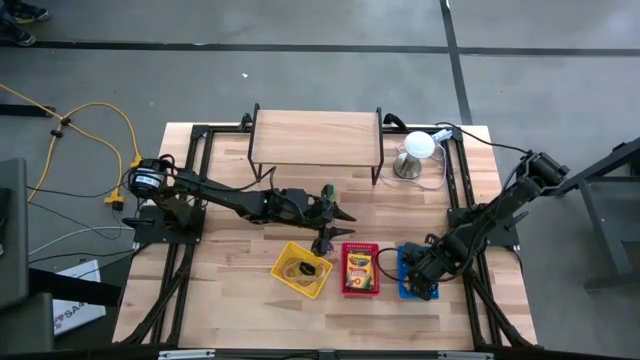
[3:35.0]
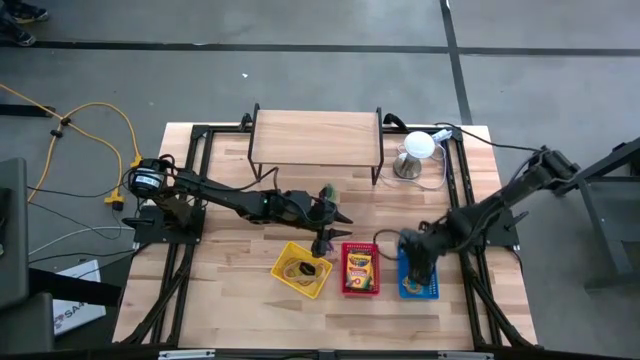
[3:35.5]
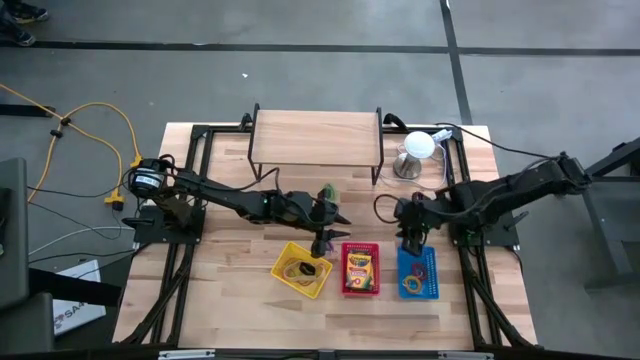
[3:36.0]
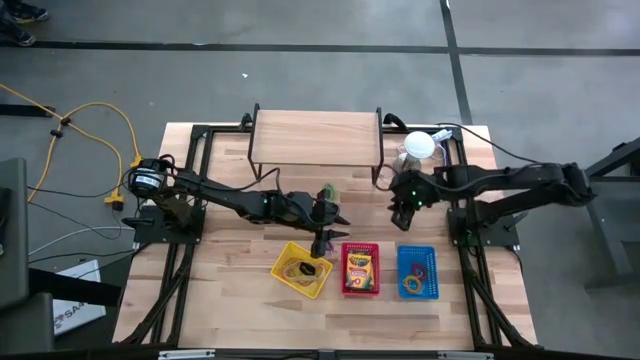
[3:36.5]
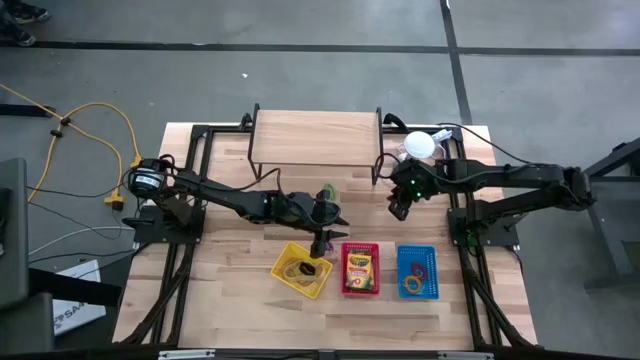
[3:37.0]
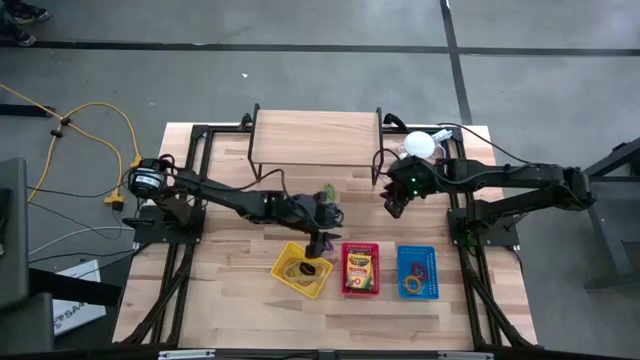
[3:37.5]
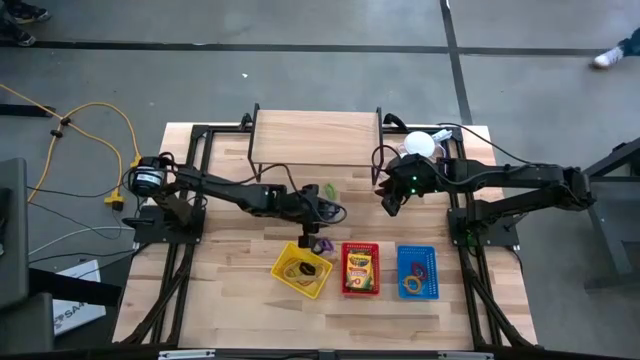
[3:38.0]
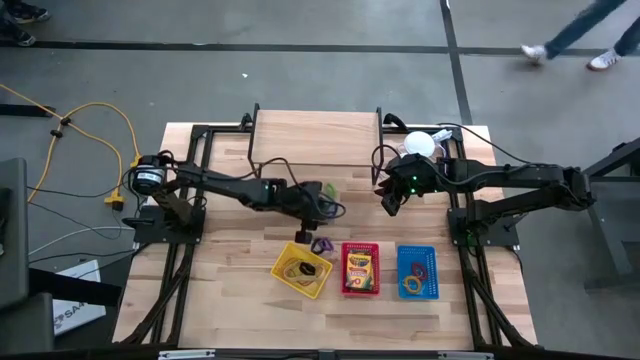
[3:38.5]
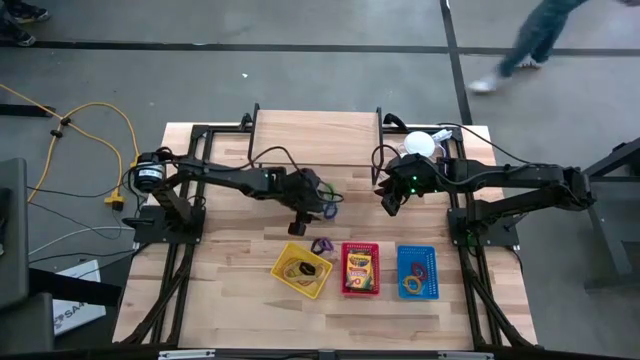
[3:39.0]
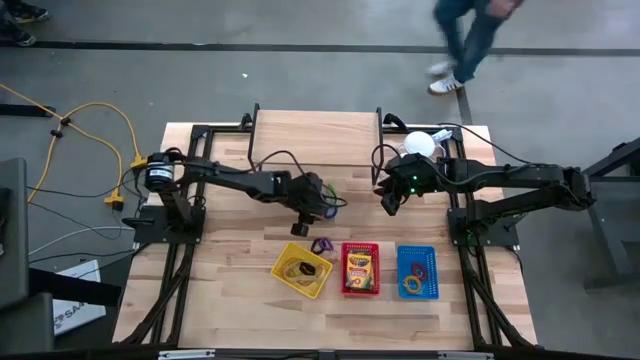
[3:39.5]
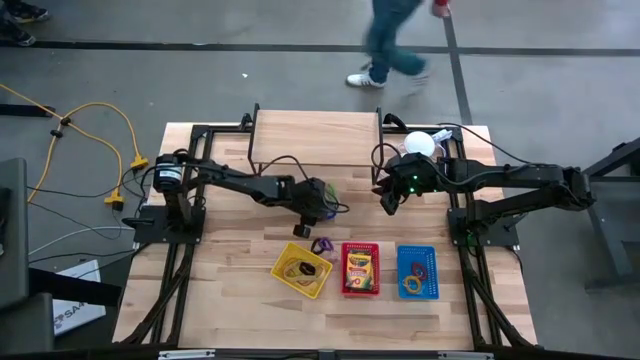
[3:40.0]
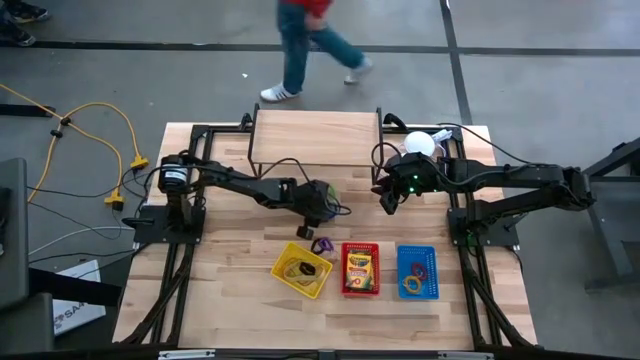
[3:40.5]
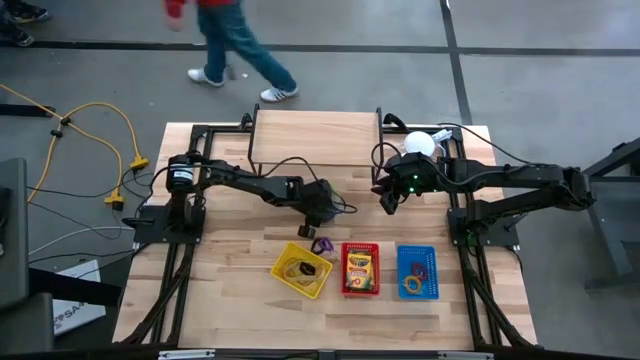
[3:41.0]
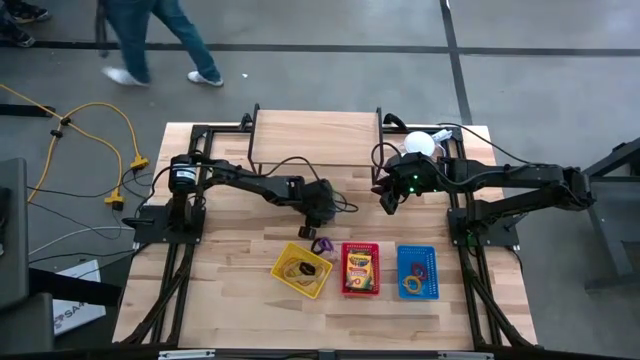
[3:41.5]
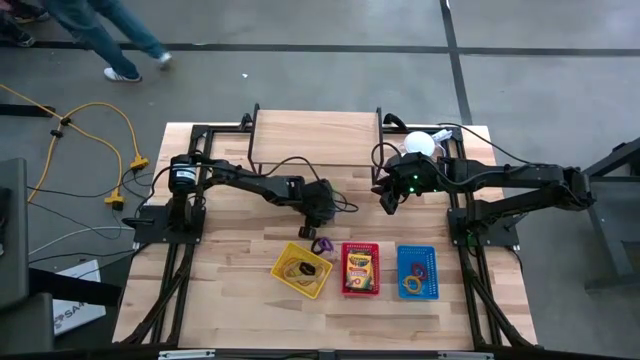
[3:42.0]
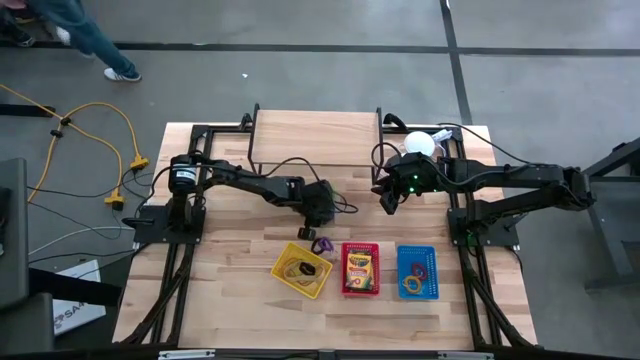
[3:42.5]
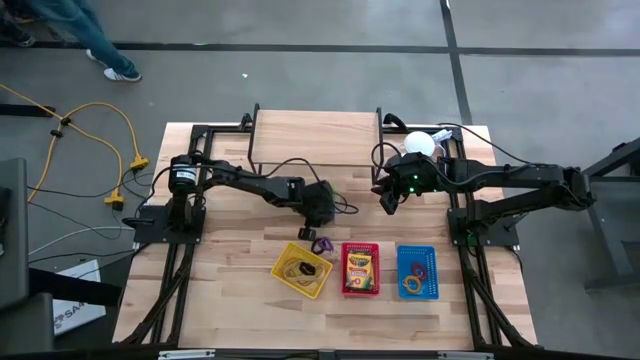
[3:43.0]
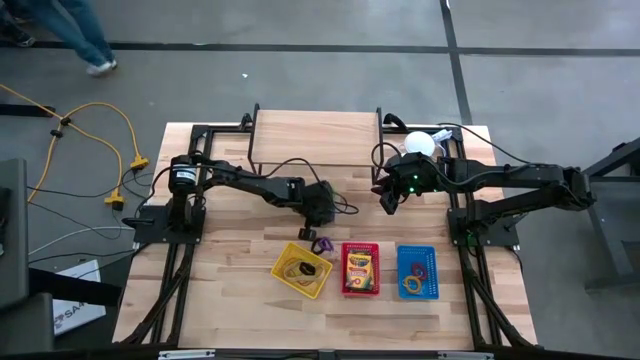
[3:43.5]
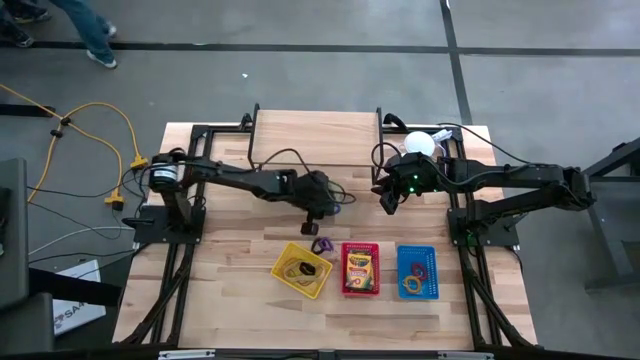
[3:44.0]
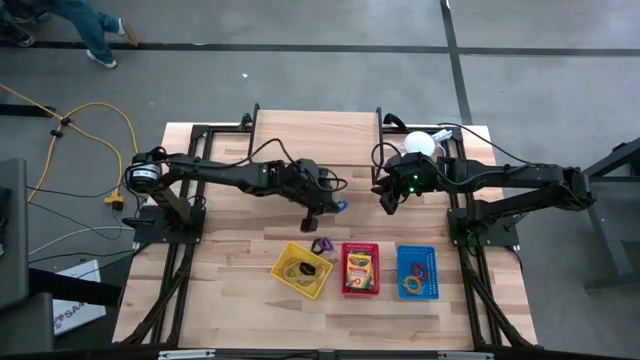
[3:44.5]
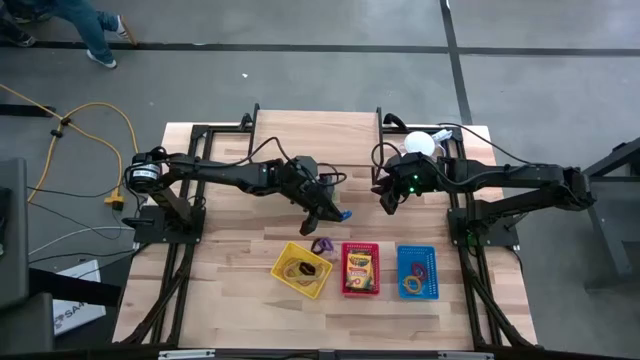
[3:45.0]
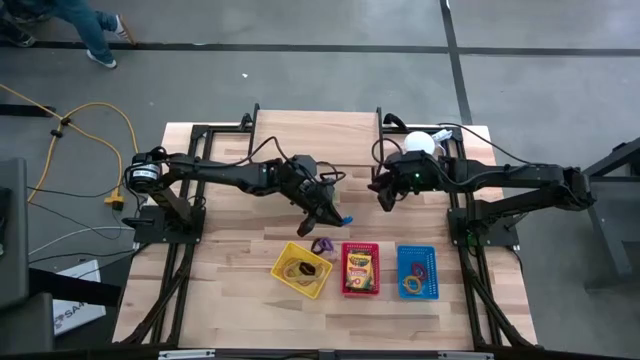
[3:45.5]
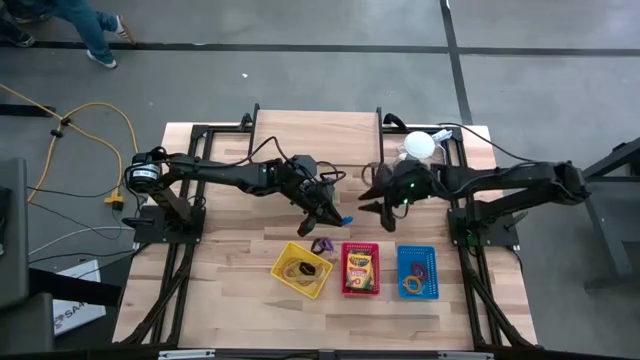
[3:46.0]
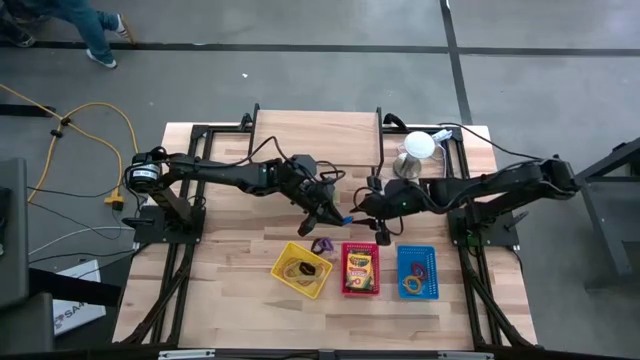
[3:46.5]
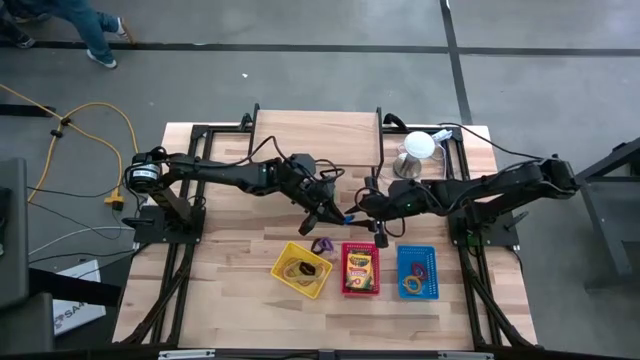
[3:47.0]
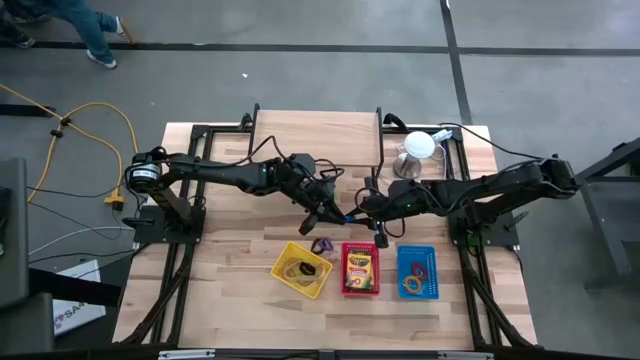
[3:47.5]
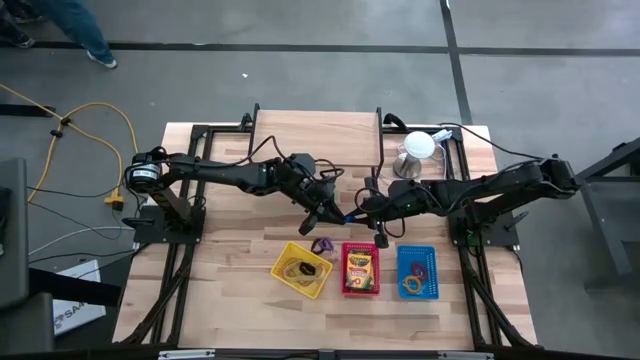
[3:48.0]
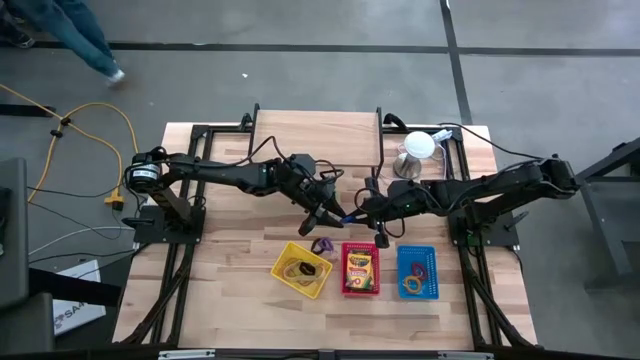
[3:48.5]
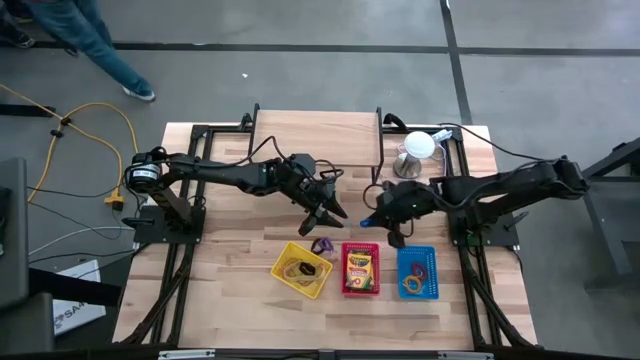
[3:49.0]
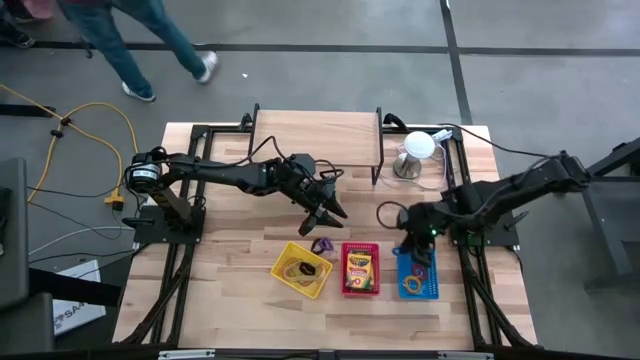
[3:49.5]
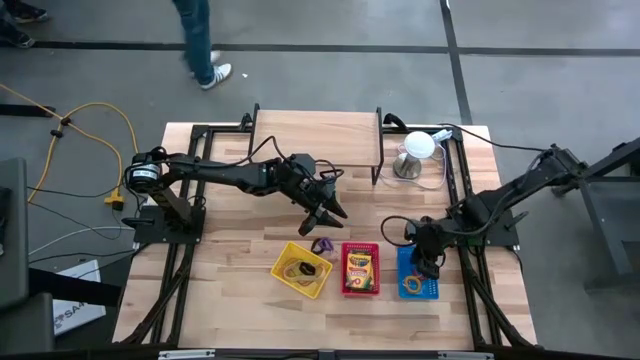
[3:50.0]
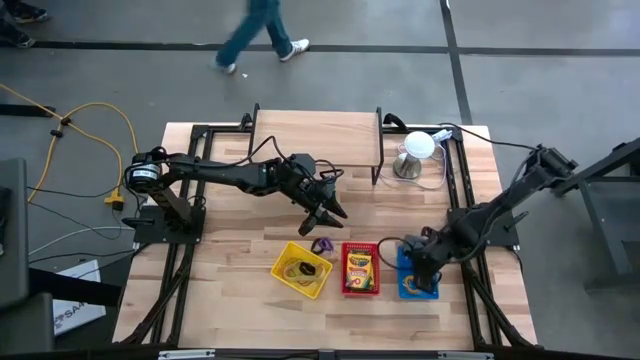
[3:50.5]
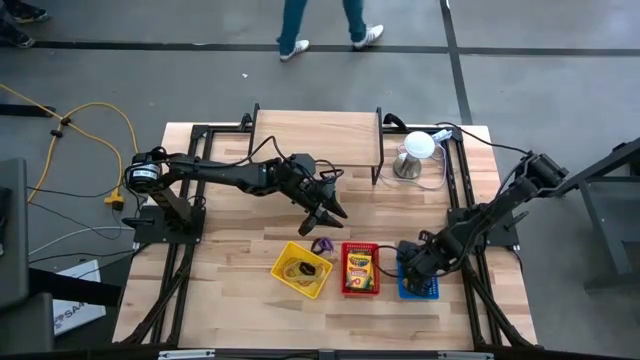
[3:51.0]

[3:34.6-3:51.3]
Task: Pick & Place Office Desk Supplies
Put the blue spring keychain into the blue bin

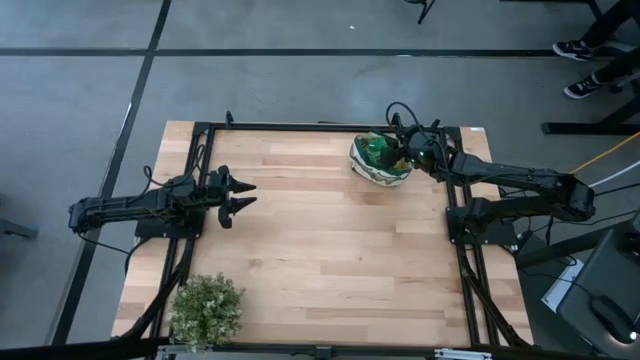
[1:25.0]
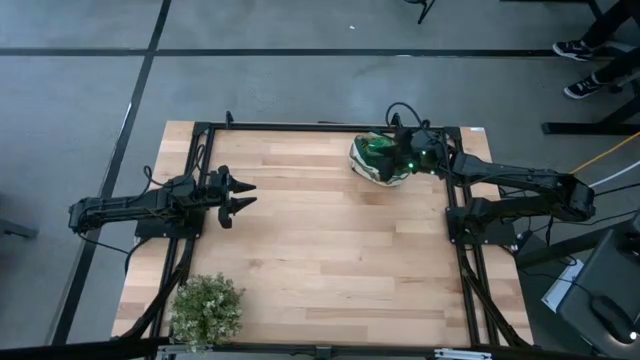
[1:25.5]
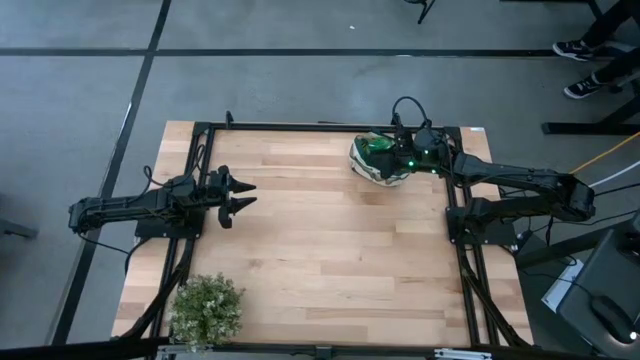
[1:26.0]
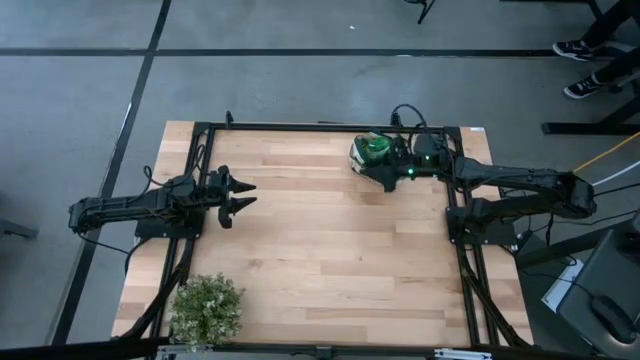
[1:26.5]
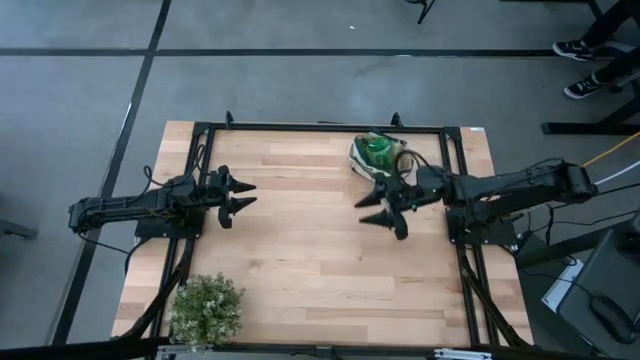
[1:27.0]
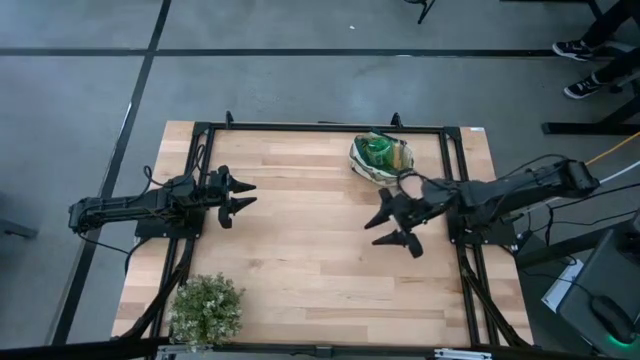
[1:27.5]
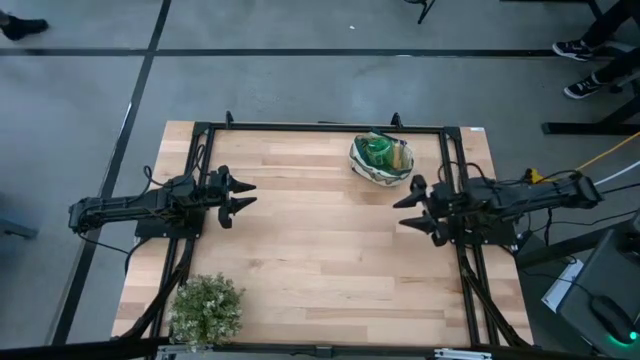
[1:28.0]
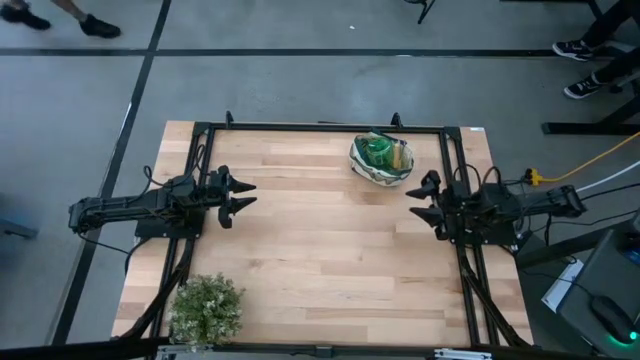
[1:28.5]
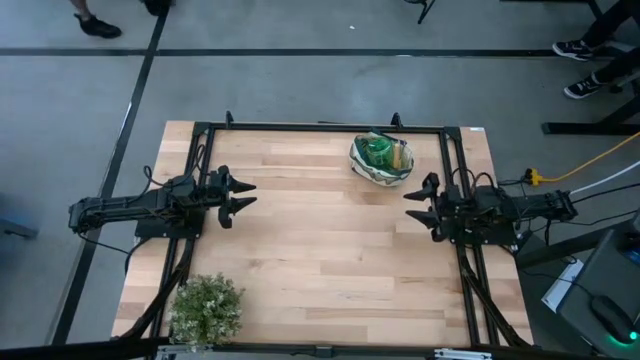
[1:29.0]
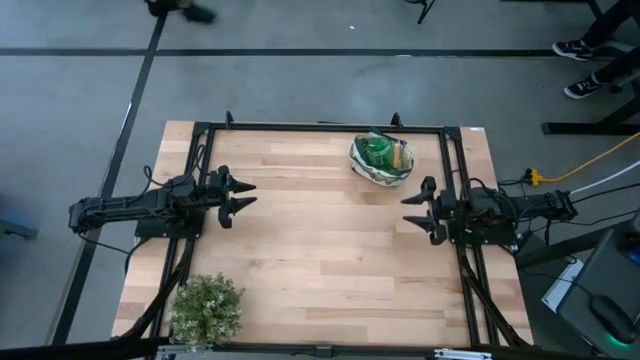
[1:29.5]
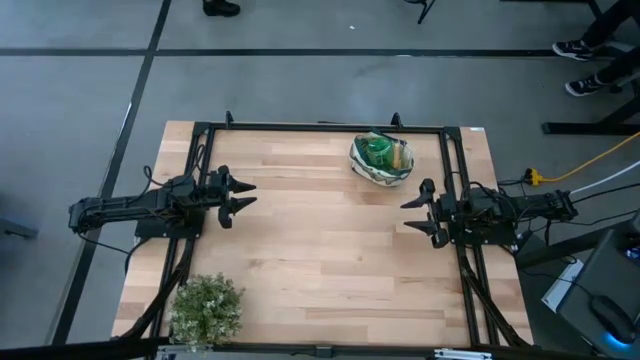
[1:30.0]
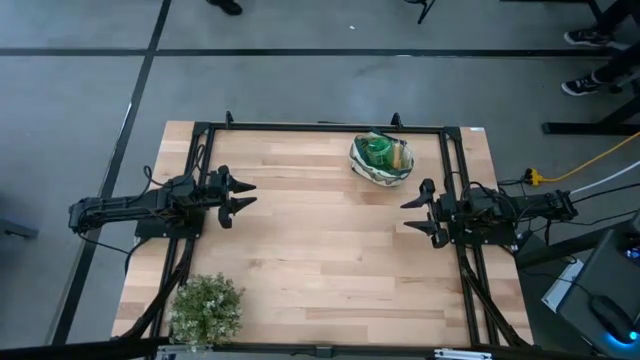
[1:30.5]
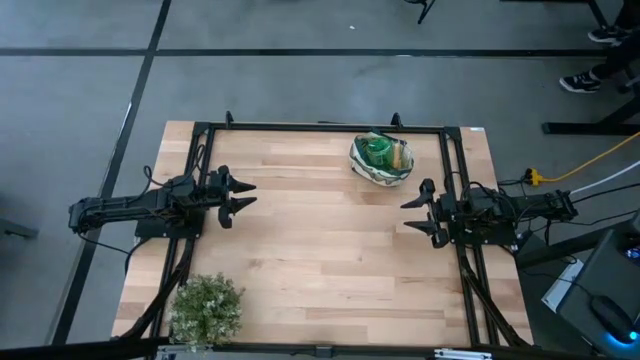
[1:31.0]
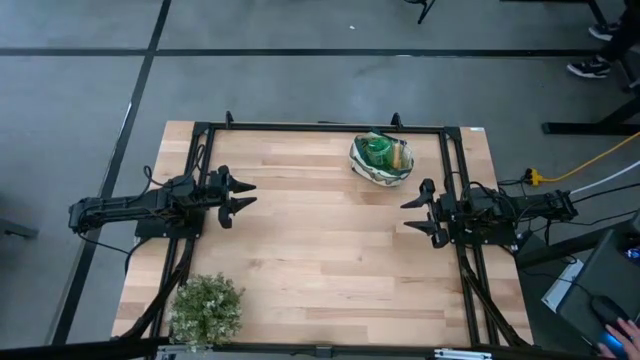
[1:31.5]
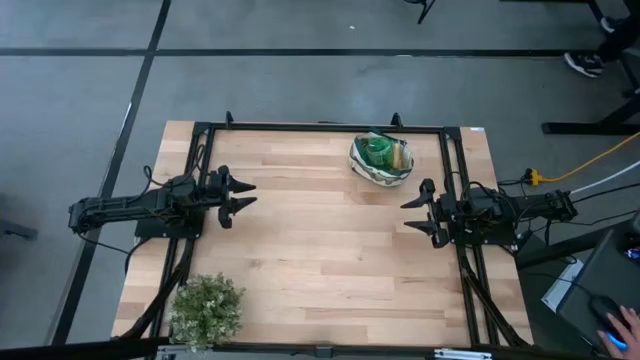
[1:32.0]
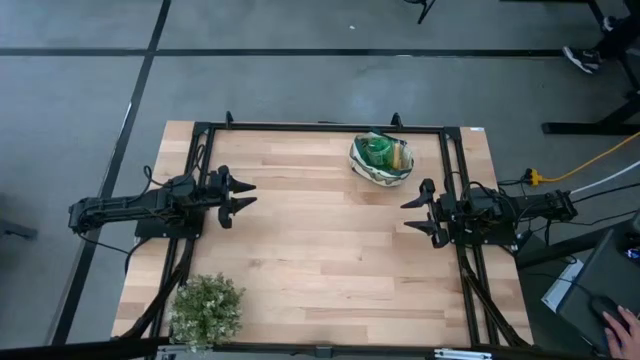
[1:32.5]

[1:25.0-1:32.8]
Task: Pick & Place Garden tools in Gardening bag
Return to Home Position
